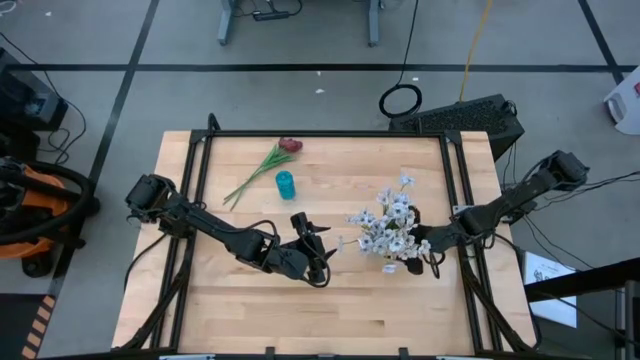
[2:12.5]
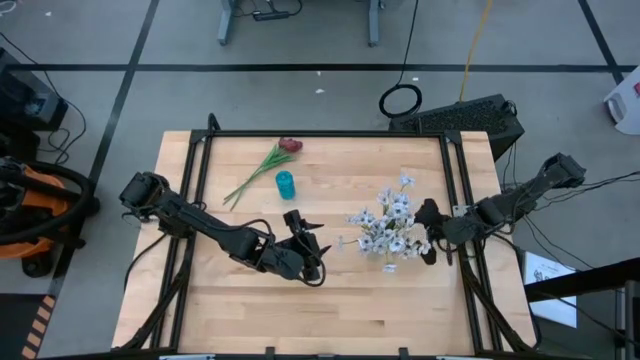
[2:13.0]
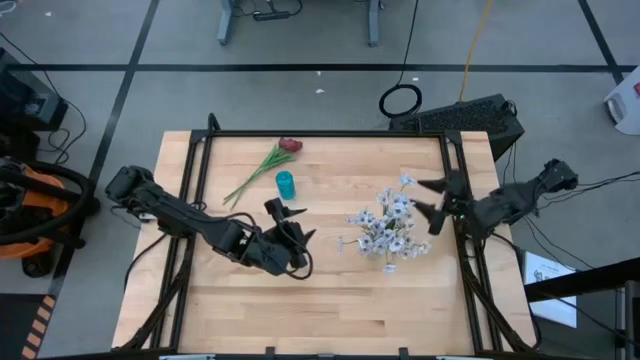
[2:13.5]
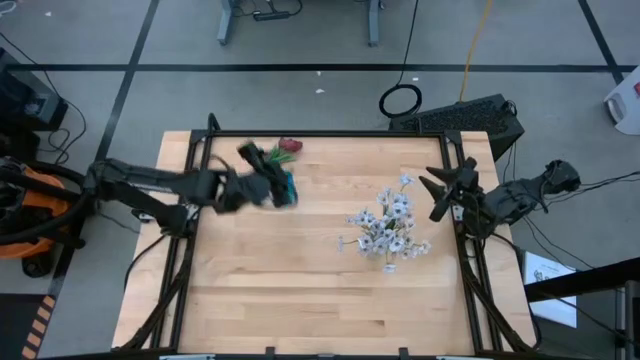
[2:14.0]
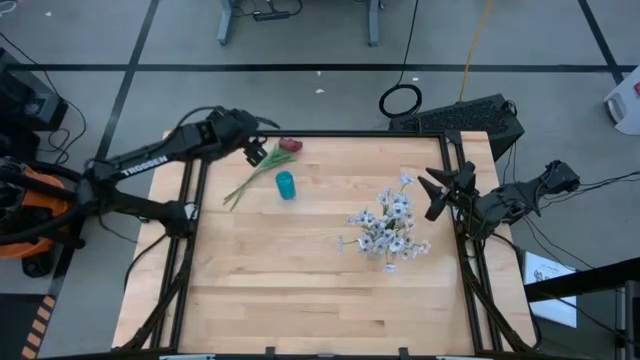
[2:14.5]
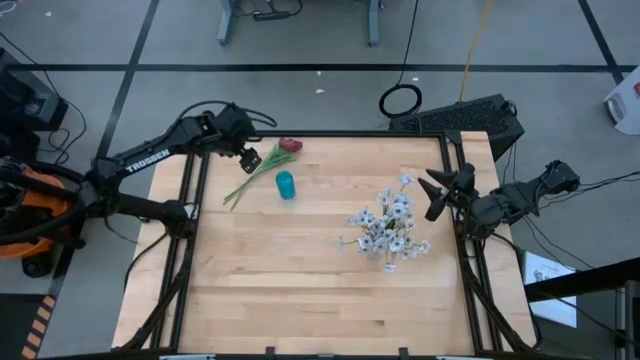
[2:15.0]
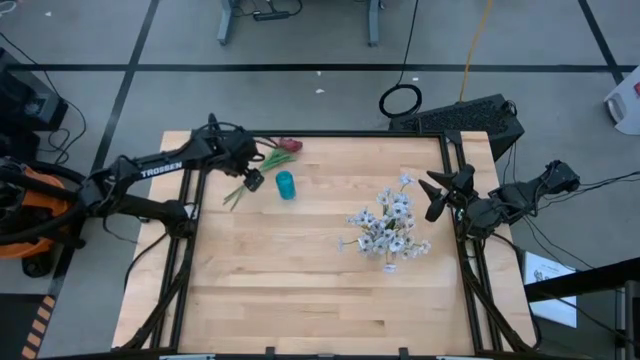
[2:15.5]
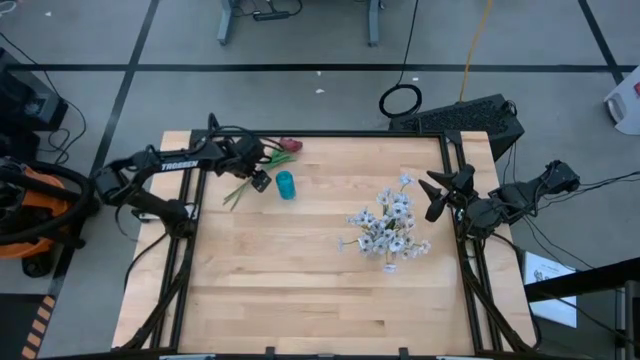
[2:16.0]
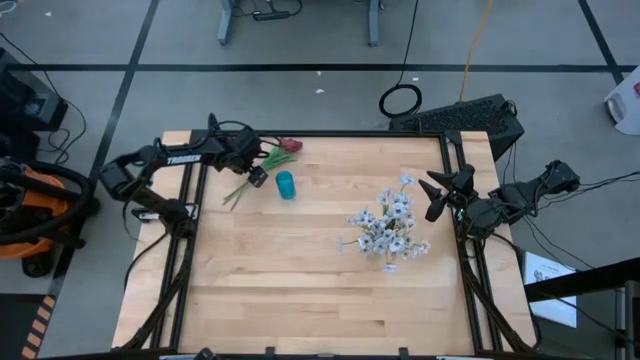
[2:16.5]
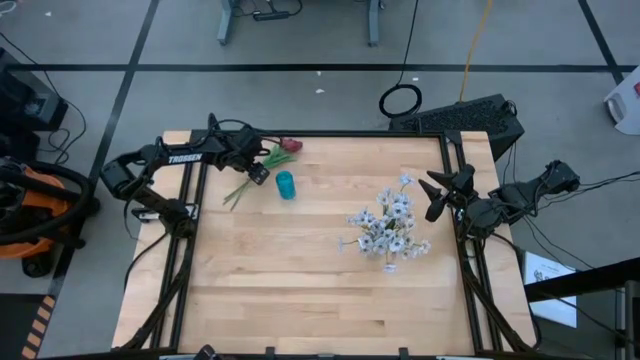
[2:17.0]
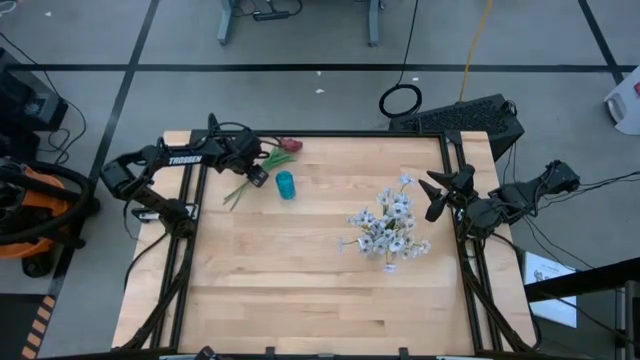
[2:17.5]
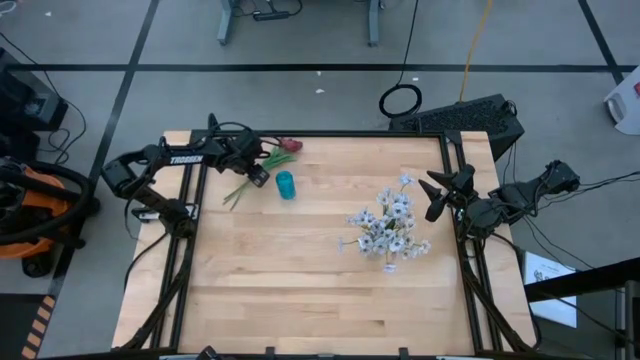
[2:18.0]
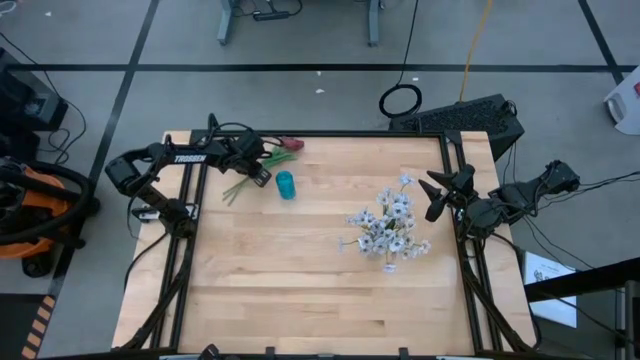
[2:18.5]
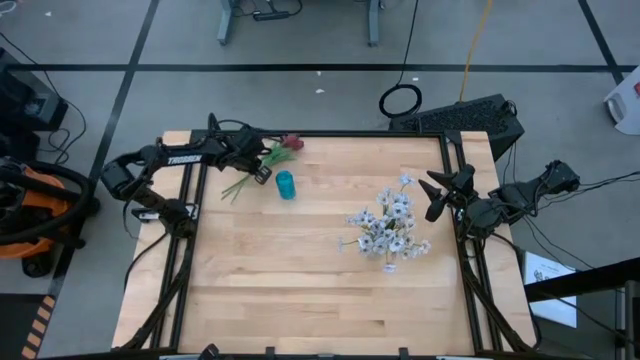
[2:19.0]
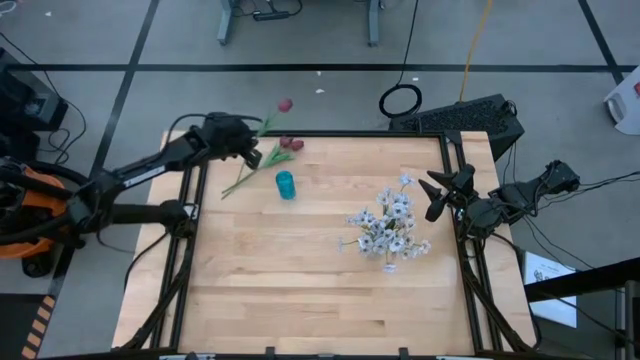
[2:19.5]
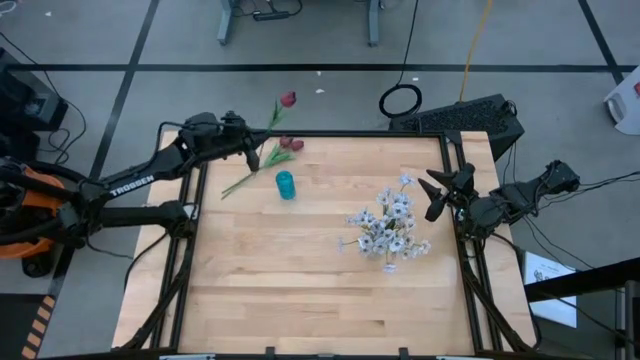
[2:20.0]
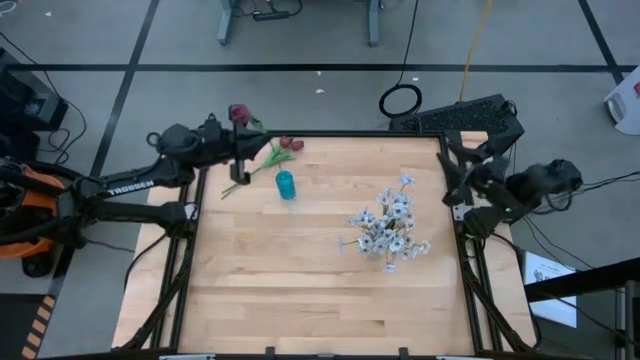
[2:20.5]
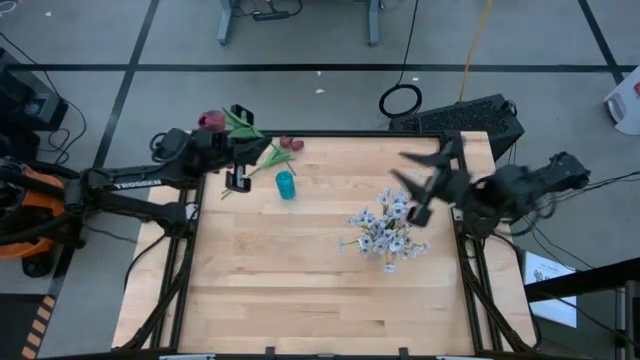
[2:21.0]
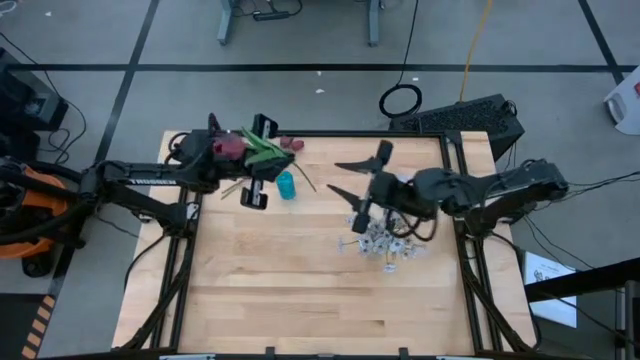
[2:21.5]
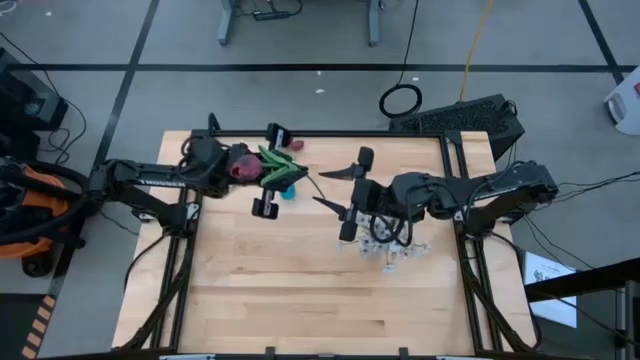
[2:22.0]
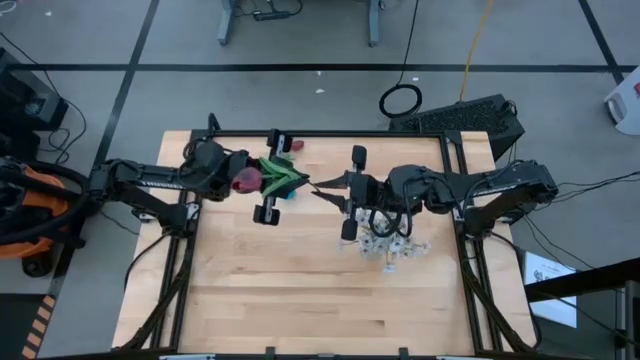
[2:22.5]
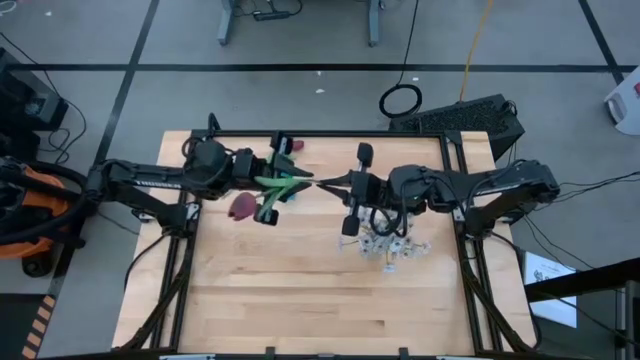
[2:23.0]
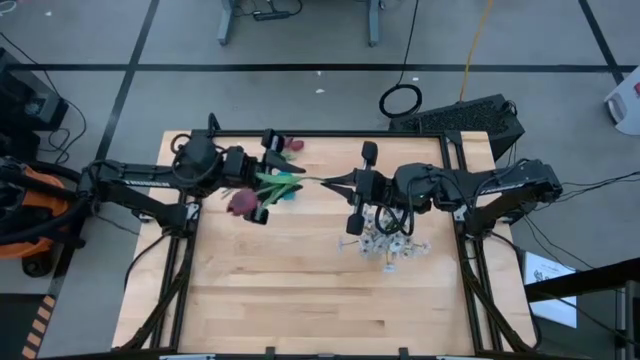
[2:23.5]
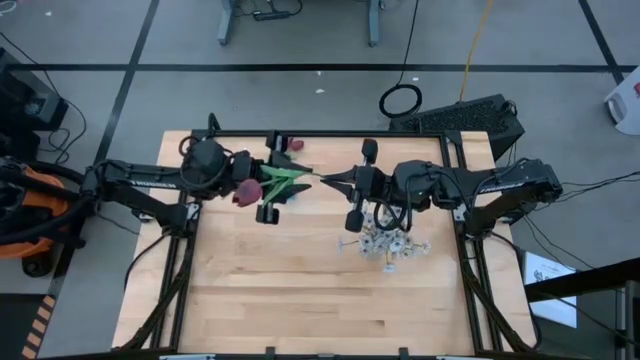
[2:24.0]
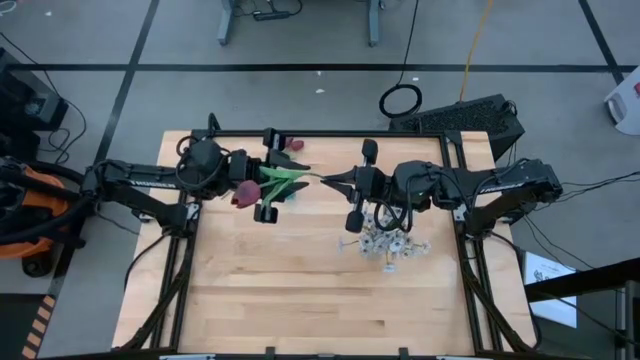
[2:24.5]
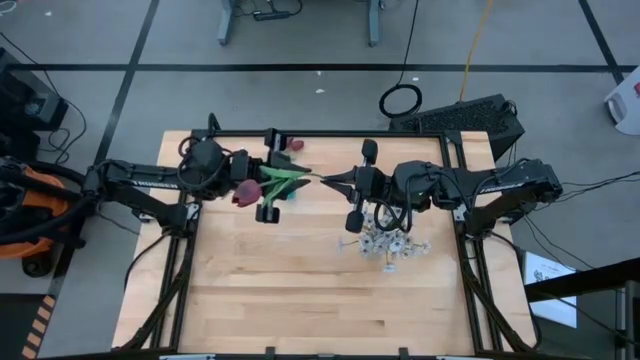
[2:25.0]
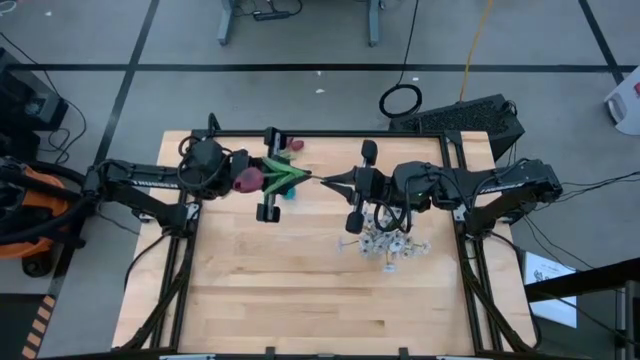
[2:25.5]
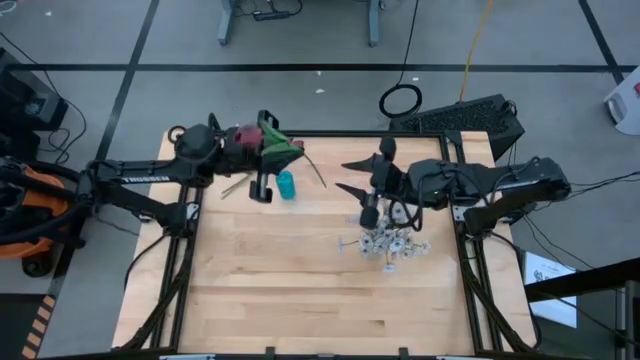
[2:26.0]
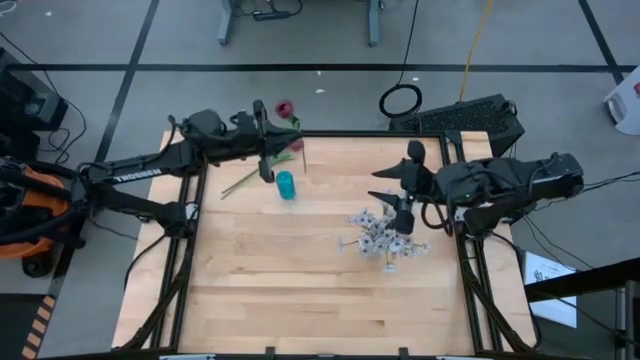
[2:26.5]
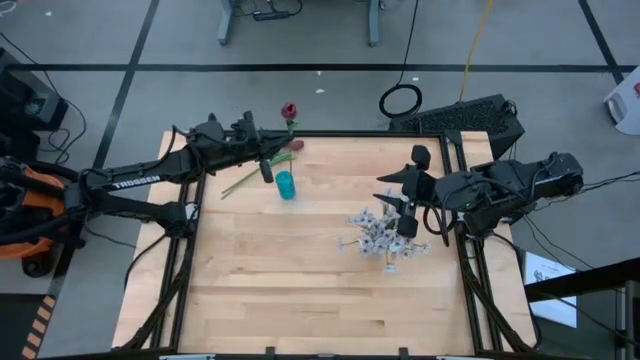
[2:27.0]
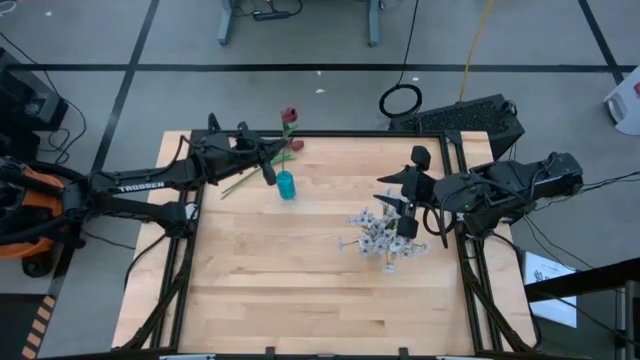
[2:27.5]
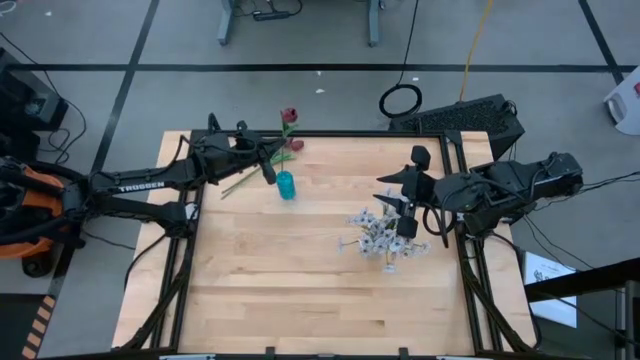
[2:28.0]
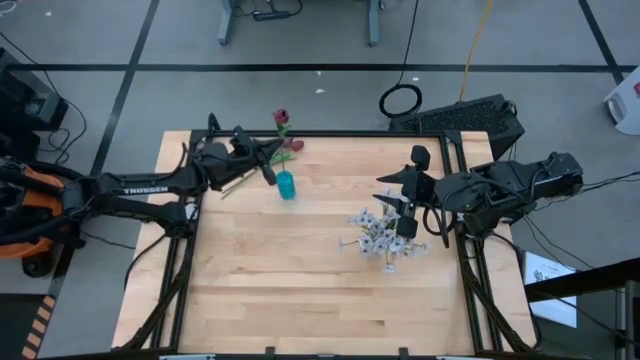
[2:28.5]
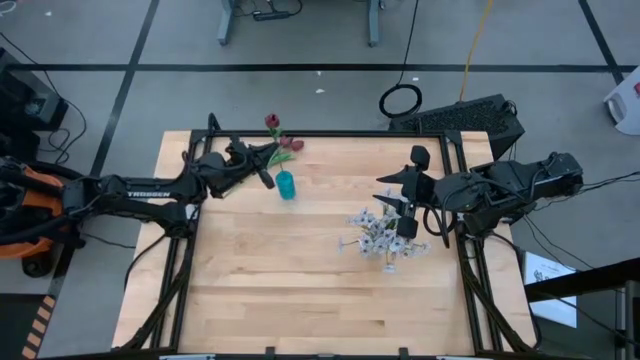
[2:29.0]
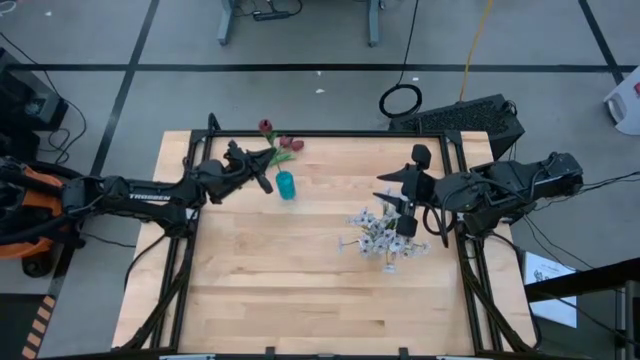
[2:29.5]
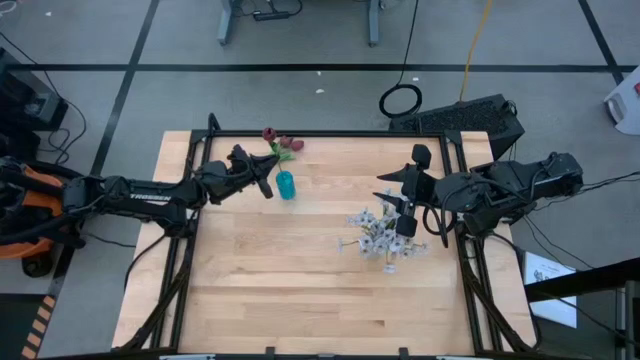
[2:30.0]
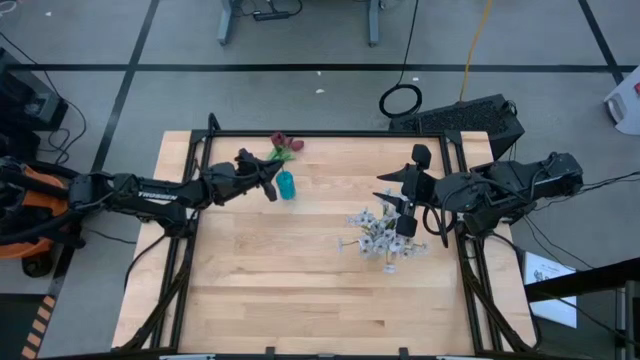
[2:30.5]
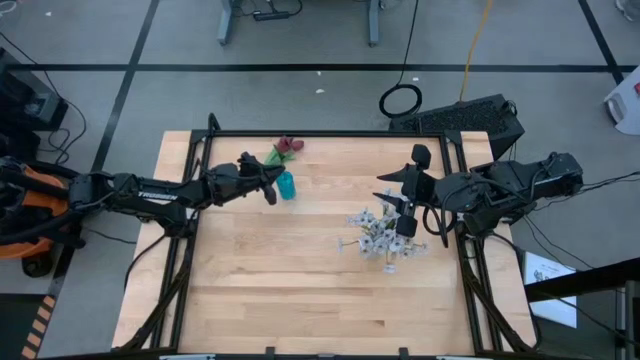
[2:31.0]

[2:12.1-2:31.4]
Task: Sort flowers into vase by color
Put the red tulip into the blue vase

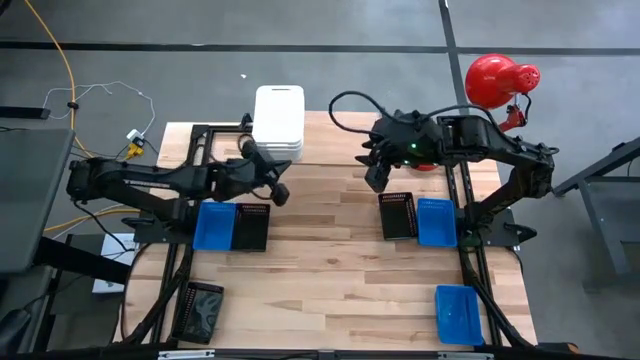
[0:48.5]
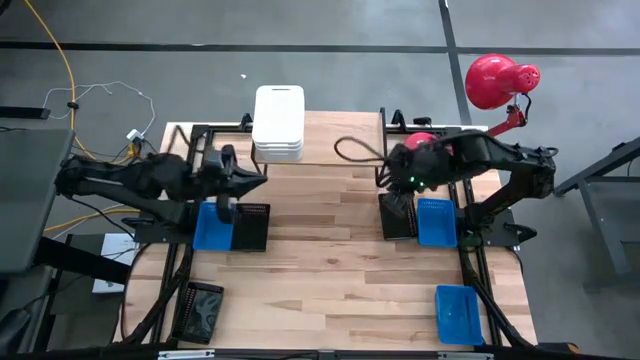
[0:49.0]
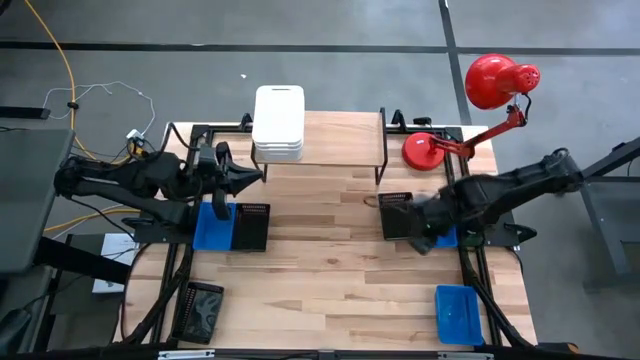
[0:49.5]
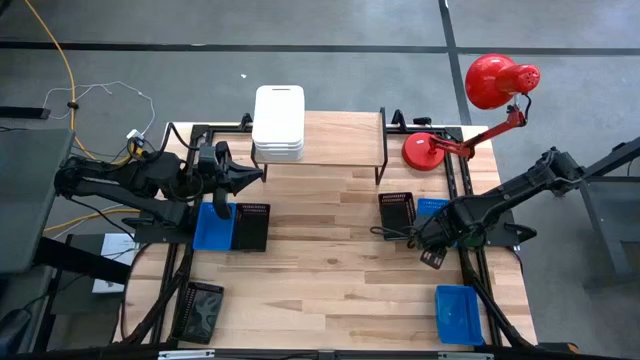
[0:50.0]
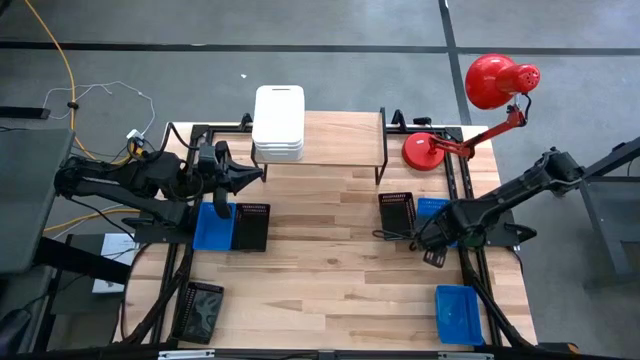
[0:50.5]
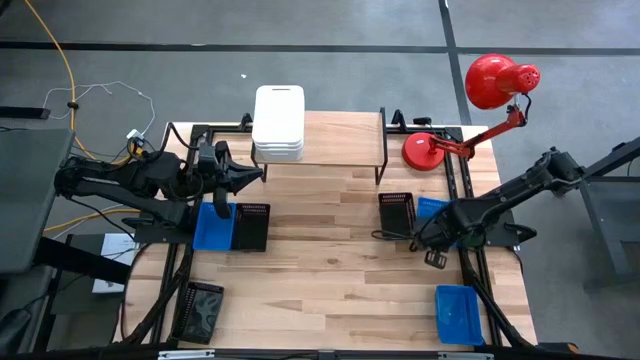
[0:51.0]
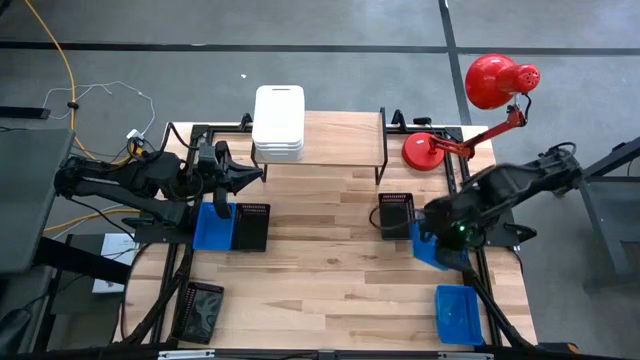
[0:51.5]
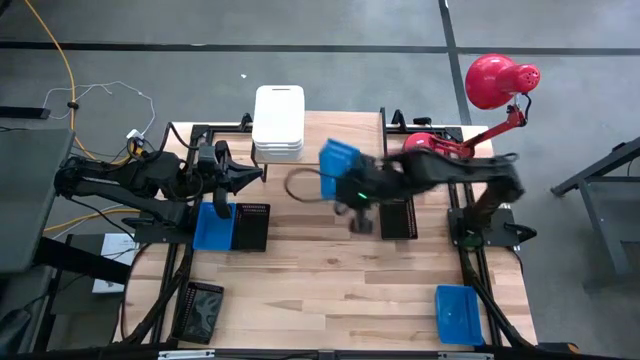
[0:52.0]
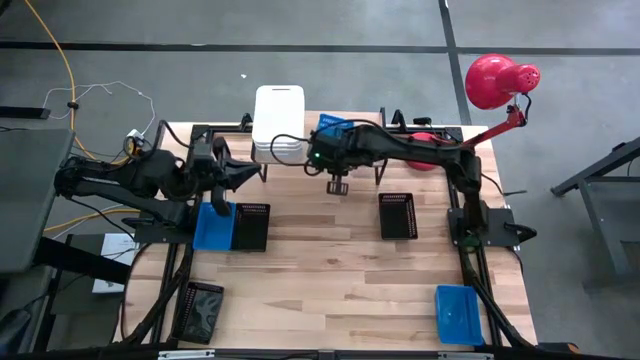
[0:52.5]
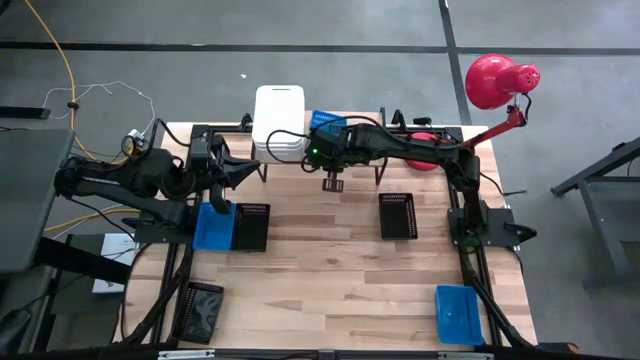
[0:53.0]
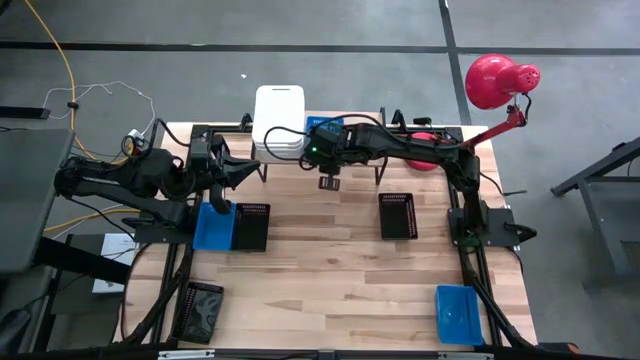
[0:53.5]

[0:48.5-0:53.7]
Task: Stack baskets on shelf by color
Put the top right blue bin on the shelf
